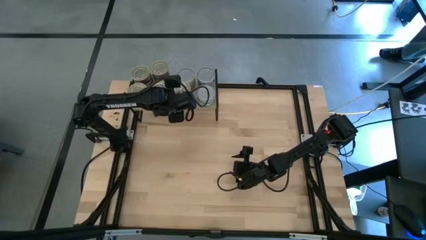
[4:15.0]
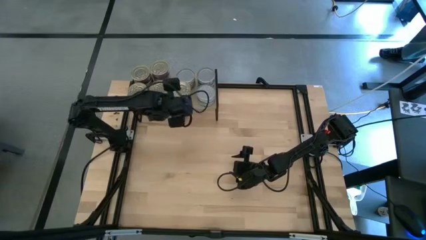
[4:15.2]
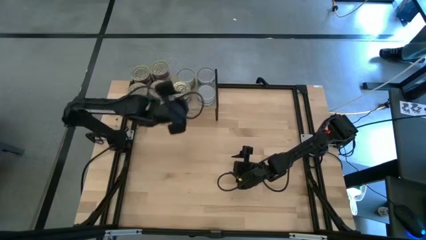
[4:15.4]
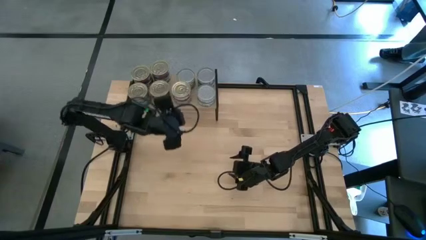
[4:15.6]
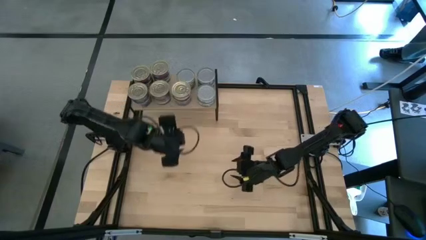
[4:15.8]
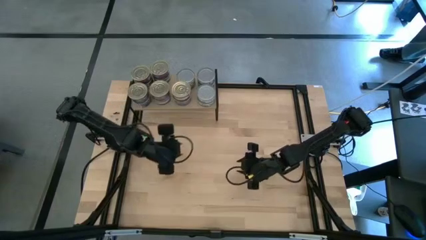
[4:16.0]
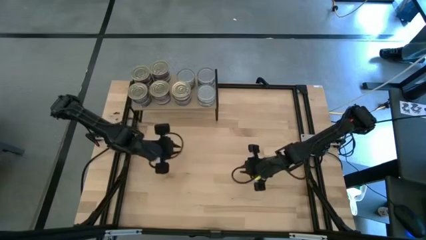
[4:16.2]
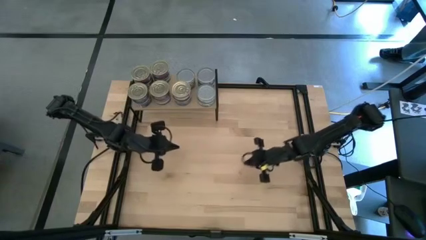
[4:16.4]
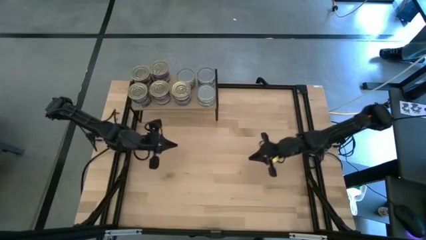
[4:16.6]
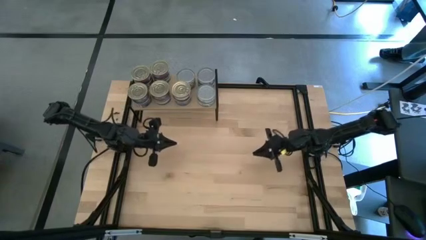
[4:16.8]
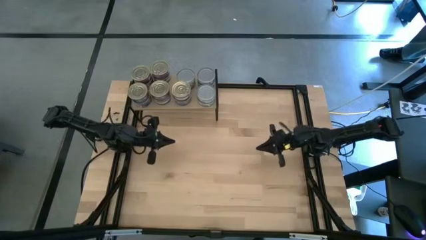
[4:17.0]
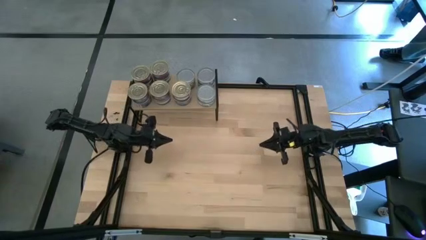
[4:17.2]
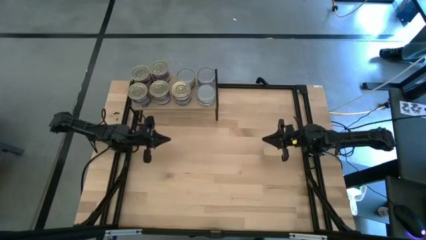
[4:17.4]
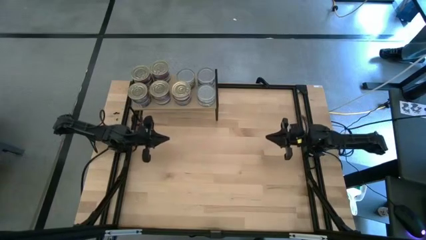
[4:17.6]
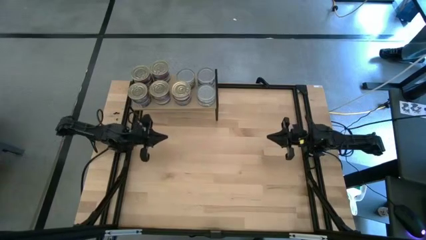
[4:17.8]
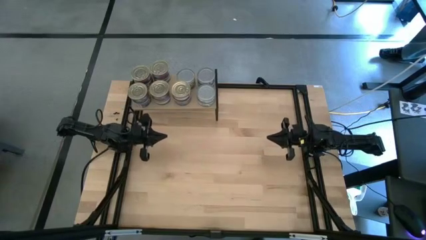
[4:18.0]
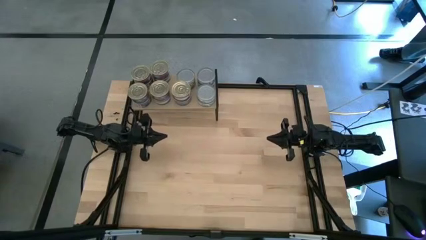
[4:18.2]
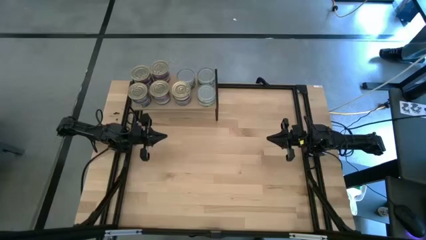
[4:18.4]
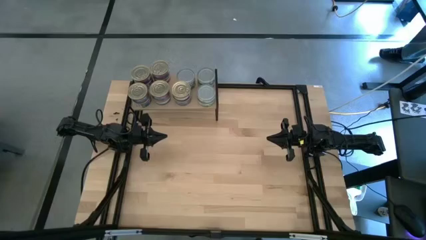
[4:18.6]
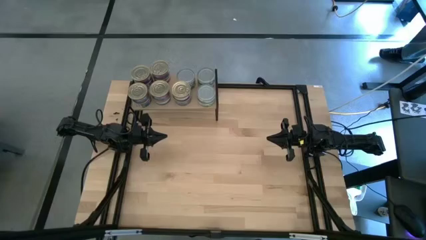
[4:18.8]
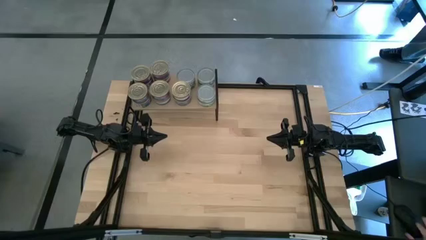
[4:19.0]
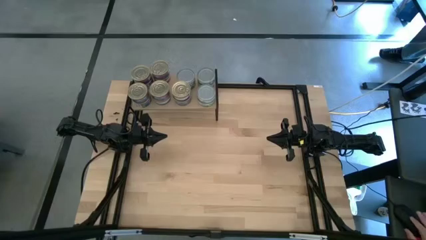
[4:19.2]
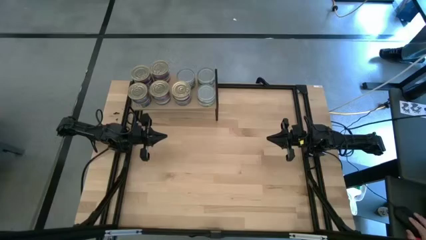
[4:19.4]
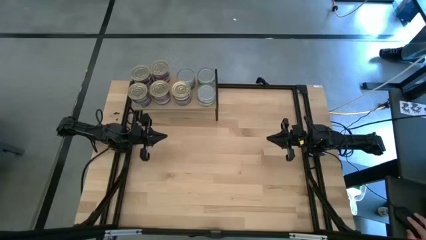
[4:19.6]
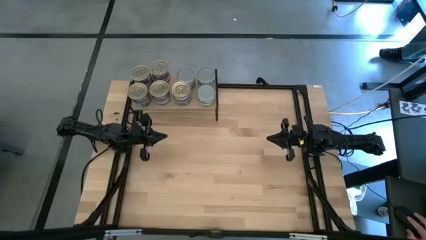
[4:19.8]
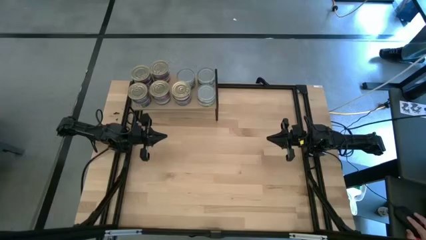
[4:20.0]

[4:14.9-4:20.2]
Task: Stack canned seafood by type on shelf
Return to Home Position

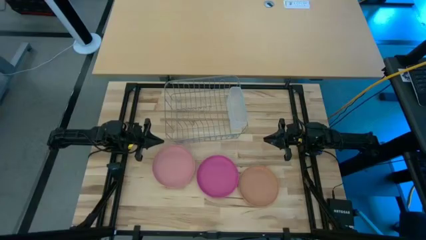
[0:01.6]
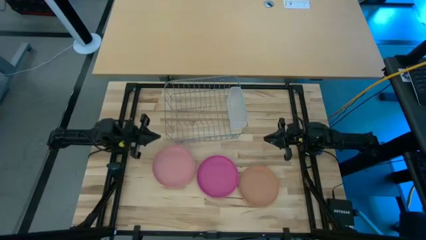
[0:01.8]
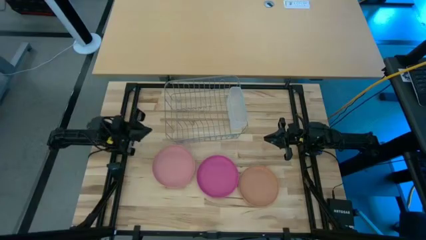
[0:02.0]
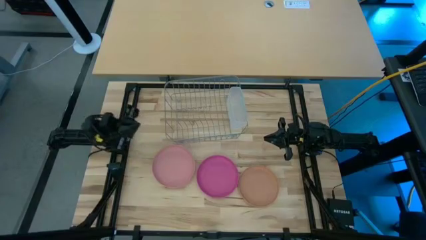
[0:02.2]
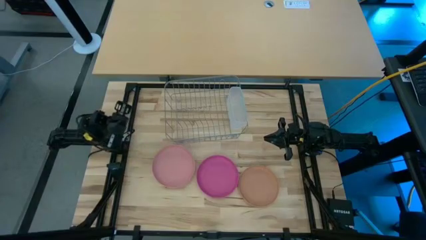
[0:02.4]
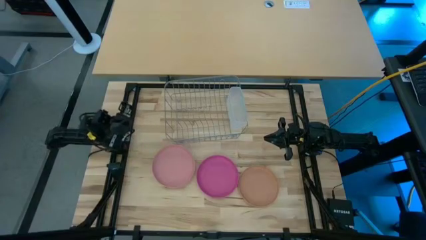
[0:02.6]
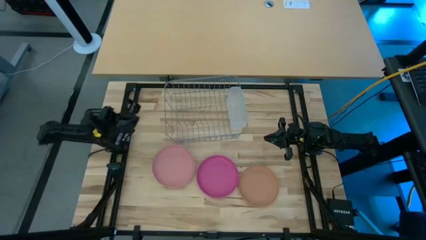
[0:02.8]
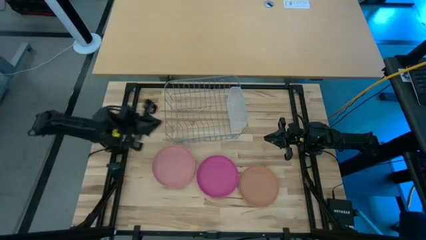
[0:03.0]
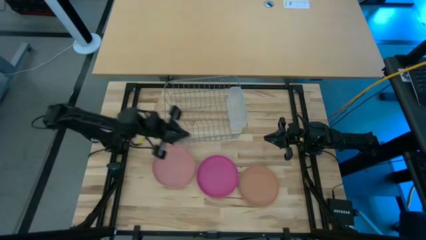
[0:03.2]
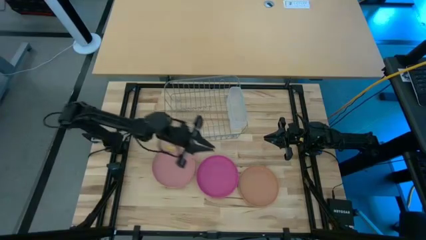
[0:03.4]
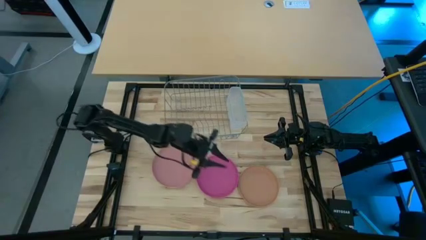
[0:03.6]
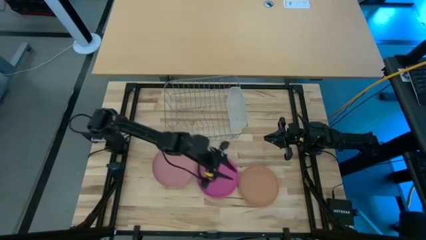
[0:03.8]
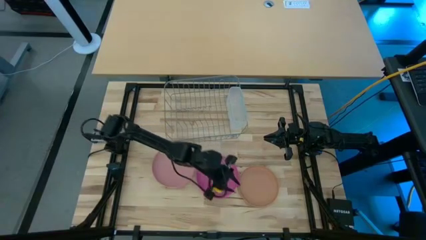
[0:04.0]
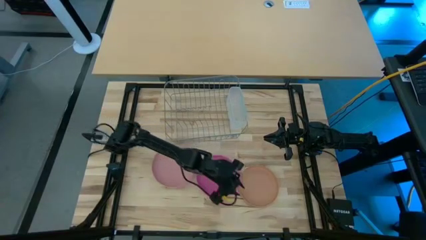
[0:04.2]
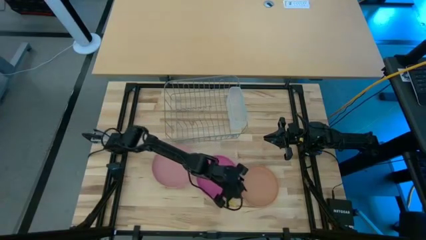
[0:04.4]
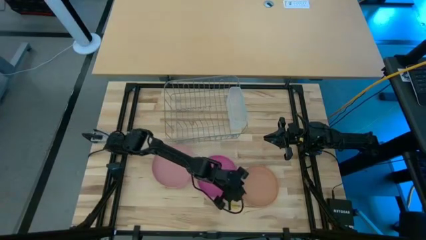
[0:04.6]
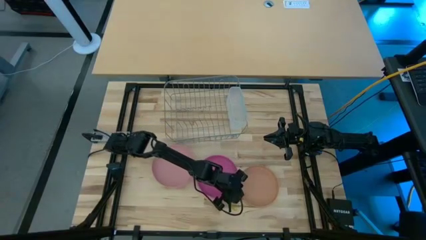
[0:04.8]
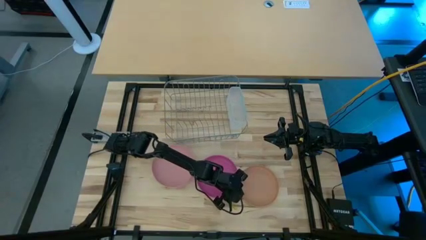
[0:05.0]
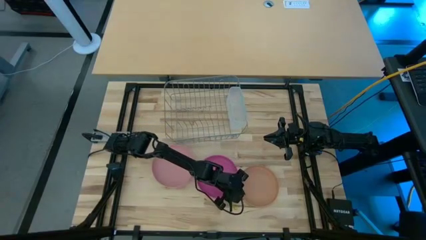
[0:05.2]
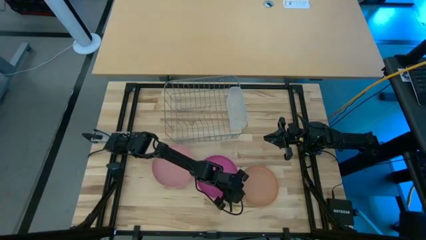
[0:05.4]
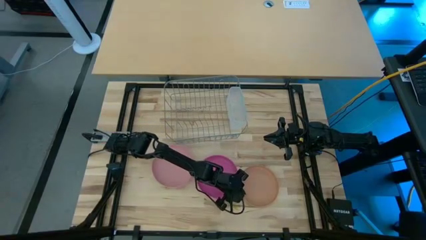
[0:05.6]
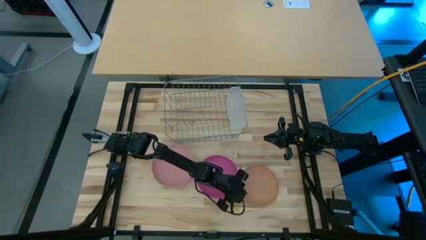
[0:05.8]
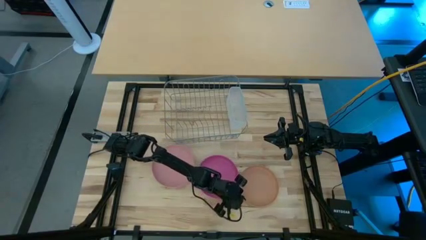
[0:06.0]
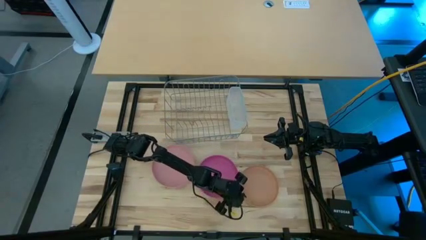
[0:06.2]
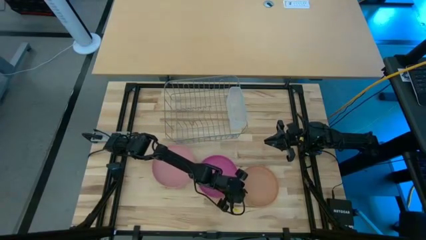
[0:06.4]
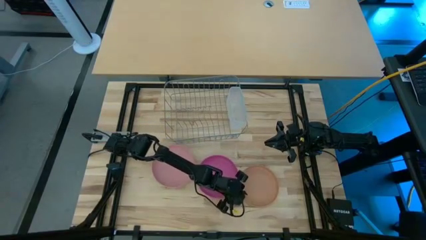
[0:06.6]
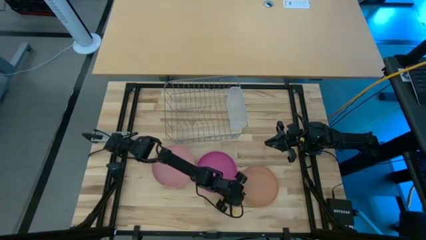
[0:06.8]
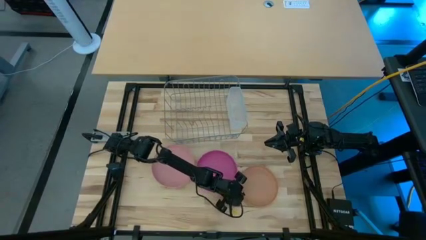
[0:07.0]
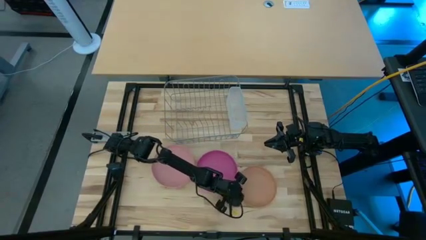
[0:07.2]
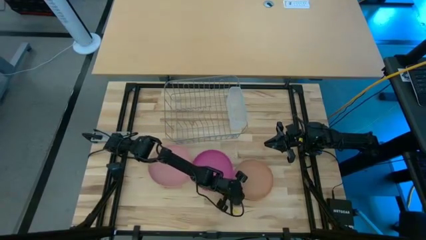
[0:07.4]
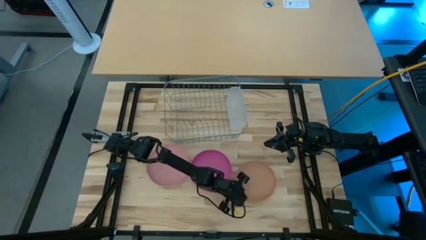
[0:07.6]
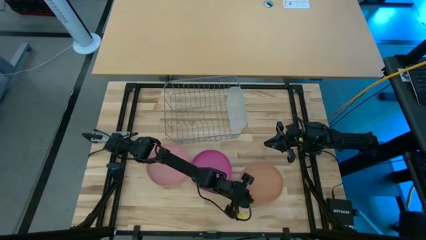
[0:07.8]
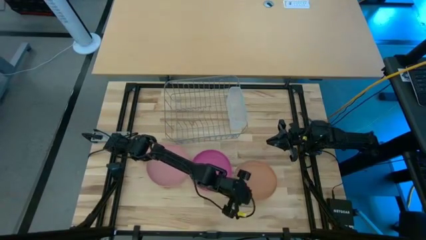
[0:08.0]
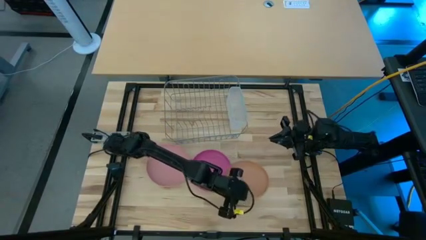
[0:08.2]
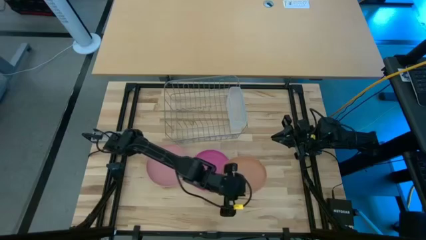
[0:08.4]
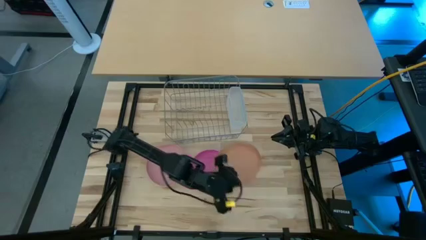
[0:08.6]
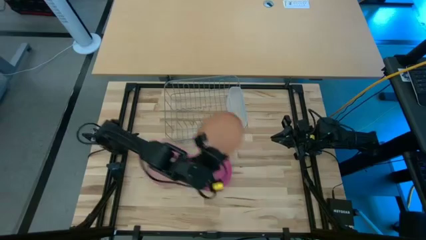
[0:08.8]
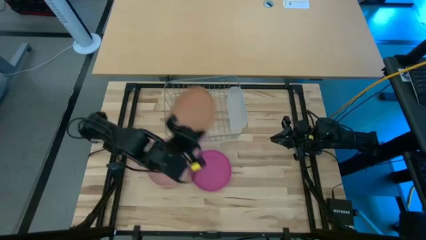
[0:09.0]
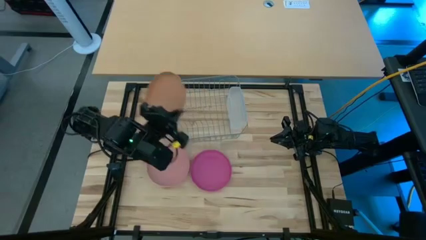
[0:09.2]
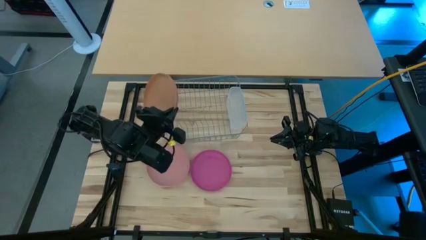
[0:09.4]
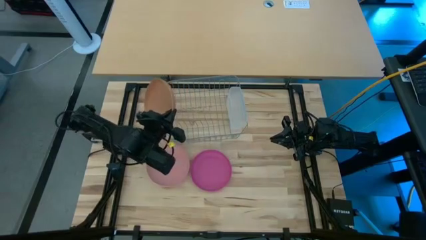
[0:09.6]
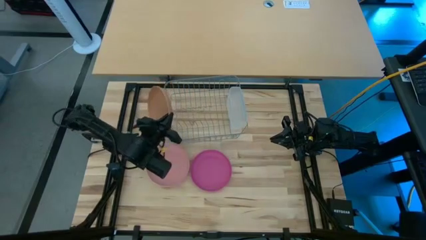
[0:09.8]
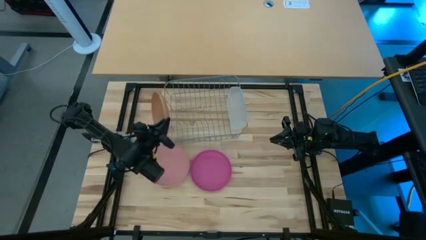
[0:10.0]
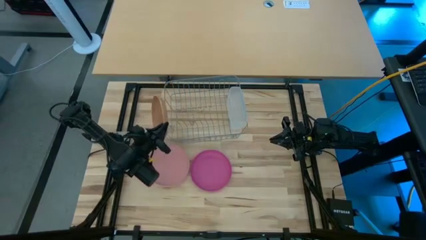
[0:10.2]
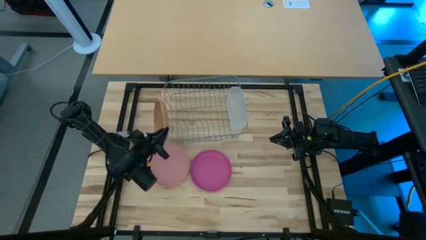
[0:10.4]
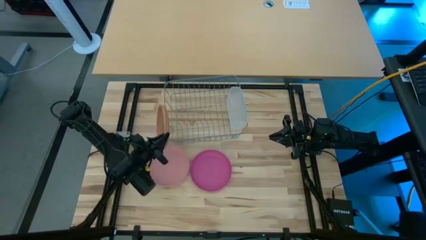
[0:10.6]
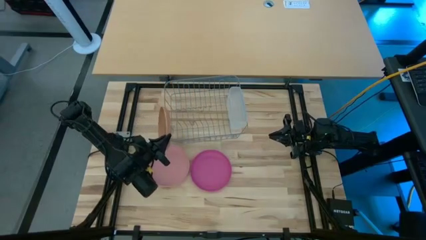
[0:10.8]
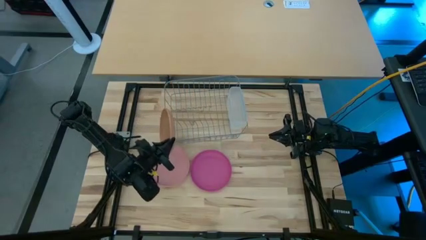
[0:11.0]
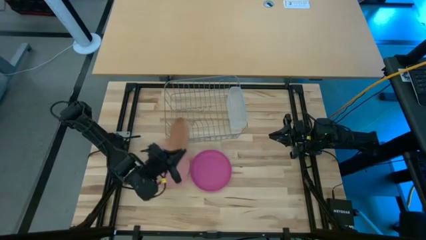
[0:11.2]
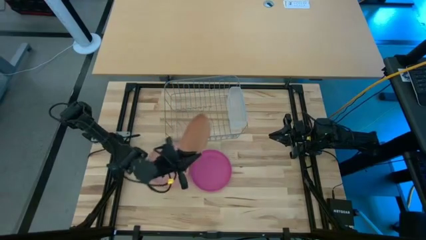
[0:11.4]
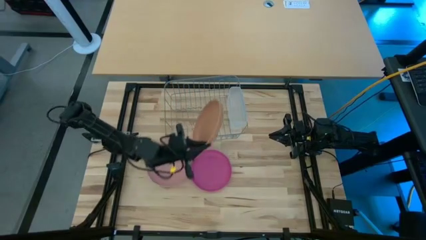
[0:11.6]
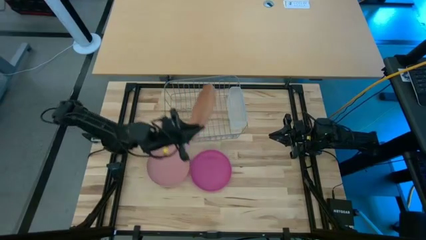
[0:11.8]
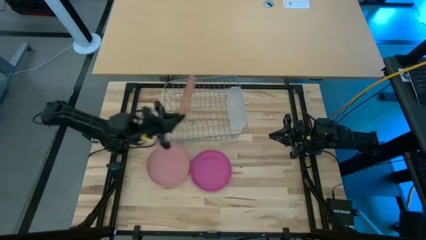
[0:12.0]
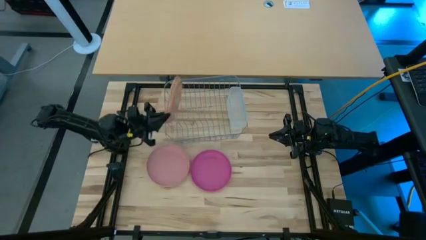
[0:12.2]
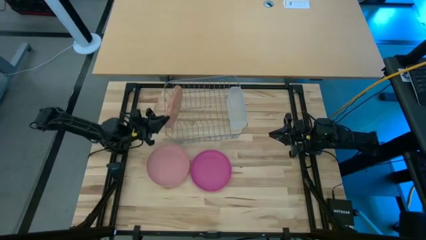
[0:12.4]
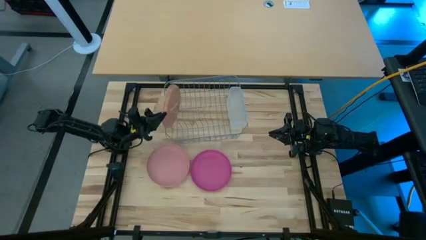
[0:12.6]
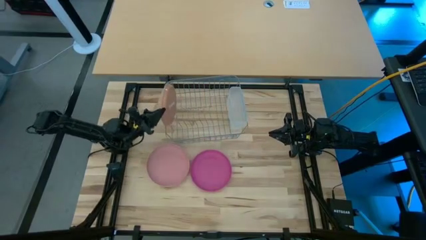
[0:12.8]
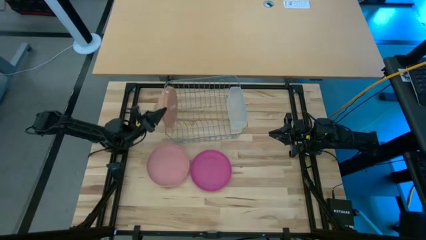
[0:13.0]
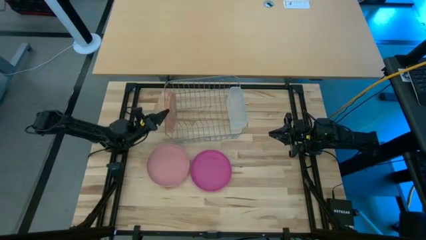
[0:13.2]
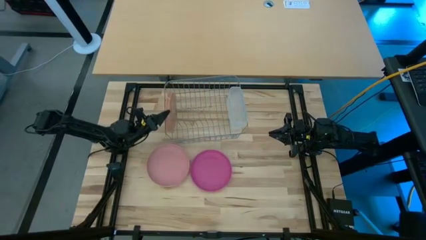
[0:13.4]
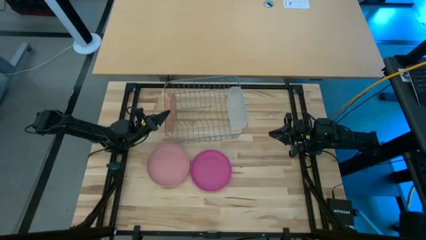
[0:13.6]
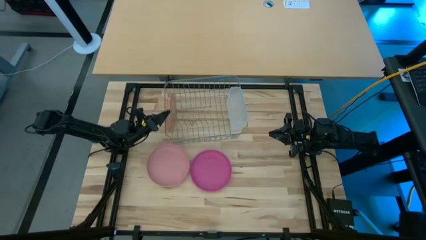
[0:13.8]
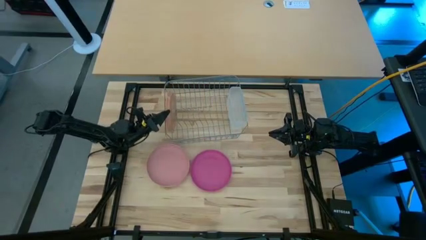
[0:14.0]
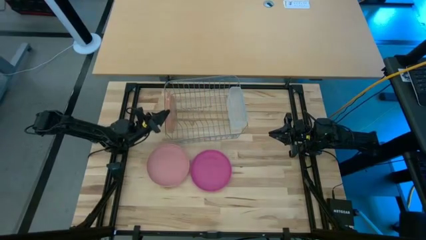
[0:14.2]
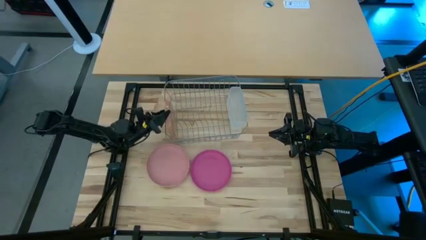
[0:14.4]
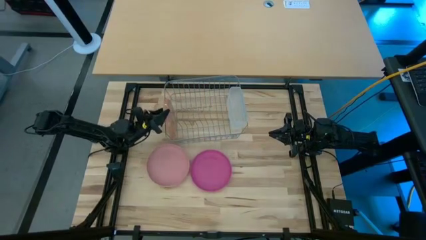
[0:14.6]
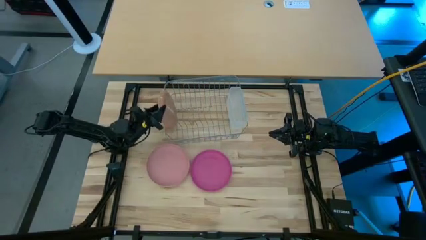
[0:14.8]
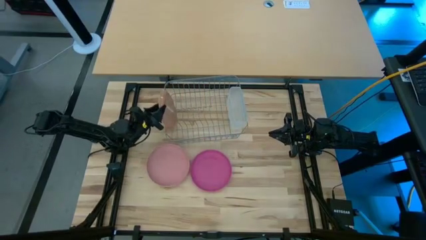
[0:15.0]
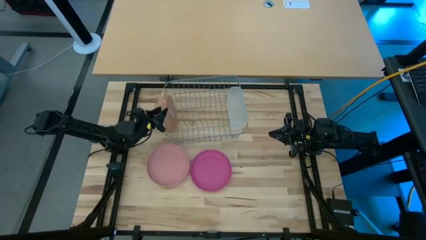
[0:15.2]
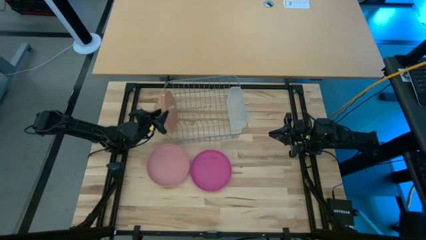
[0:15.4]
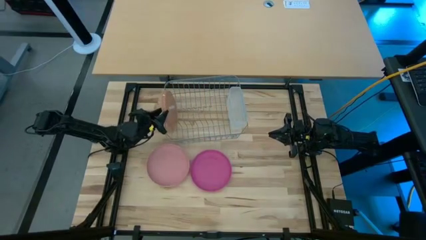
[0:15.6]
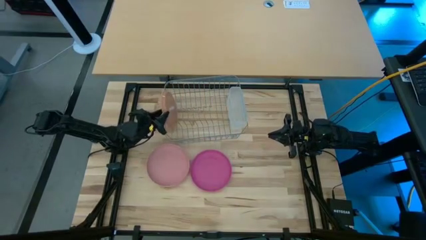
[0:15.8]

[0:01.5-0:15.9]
Task: Sort dishes
Put the brown plate into the dish rack
